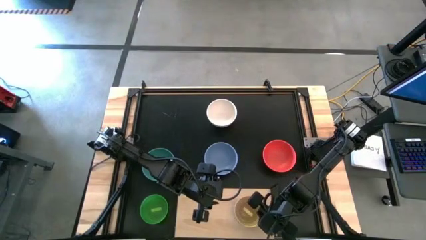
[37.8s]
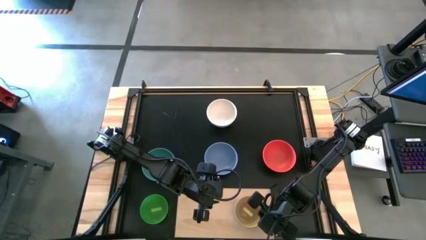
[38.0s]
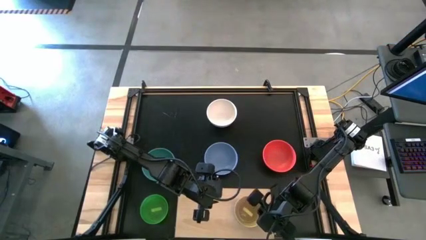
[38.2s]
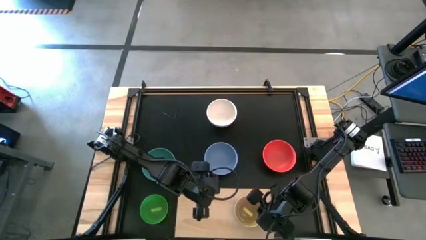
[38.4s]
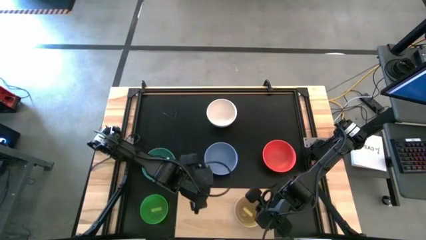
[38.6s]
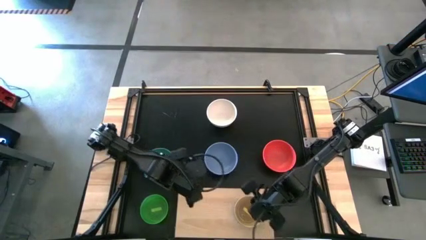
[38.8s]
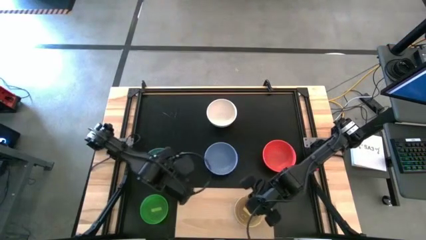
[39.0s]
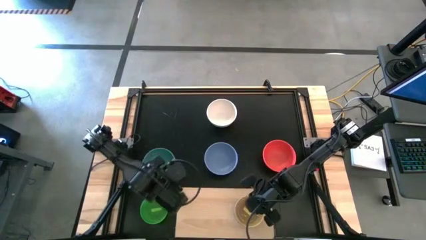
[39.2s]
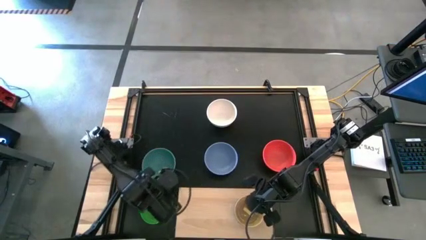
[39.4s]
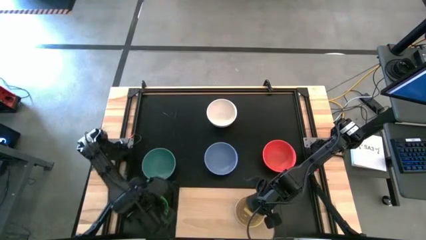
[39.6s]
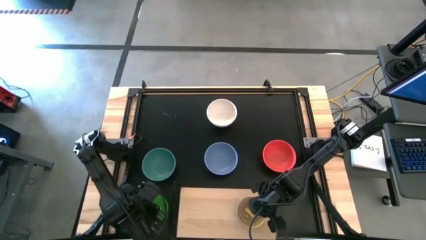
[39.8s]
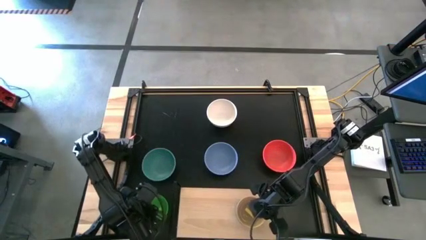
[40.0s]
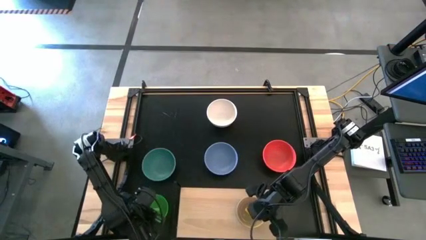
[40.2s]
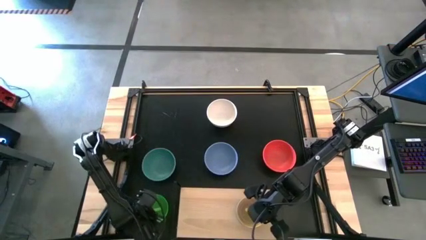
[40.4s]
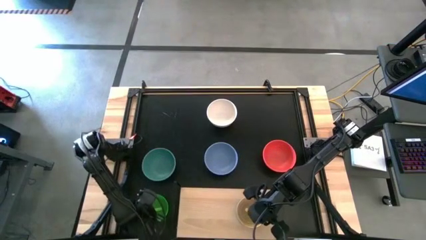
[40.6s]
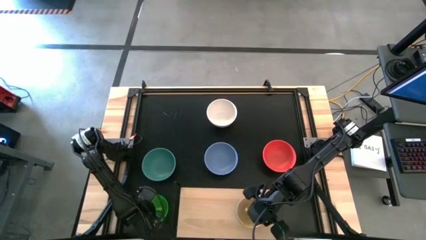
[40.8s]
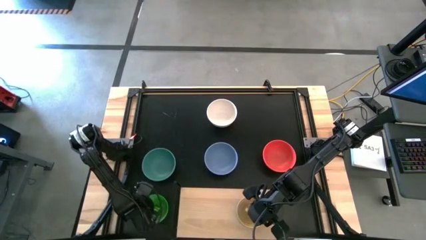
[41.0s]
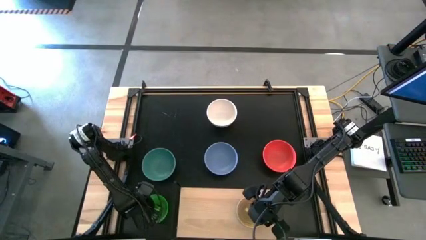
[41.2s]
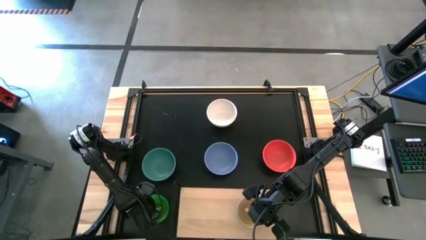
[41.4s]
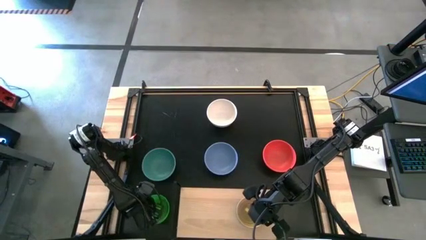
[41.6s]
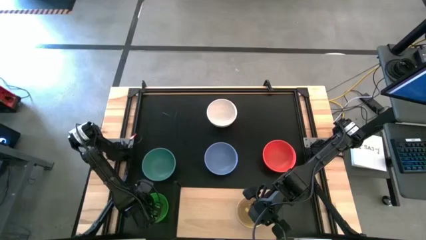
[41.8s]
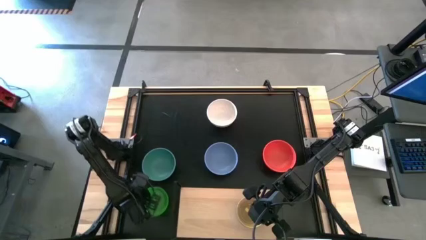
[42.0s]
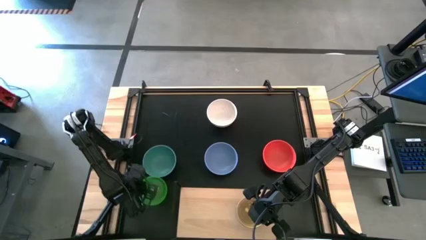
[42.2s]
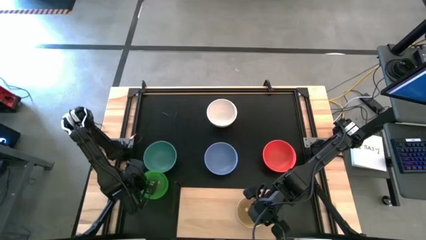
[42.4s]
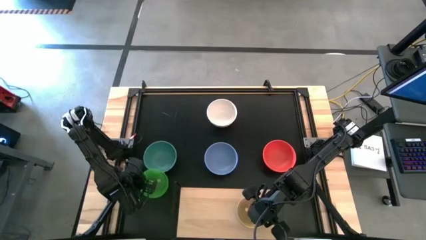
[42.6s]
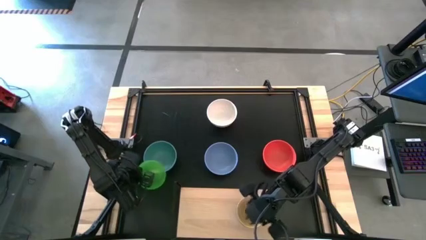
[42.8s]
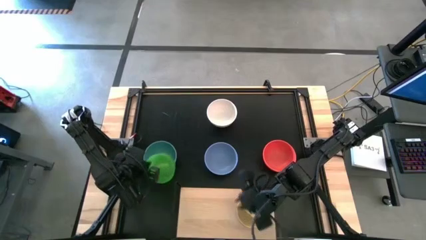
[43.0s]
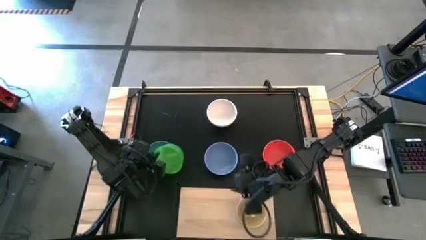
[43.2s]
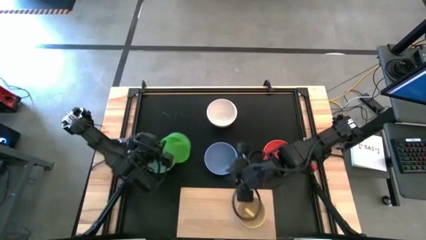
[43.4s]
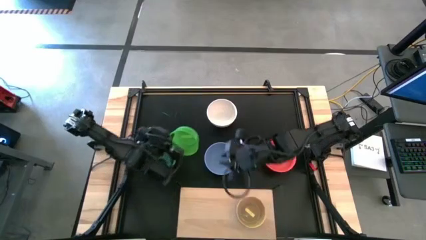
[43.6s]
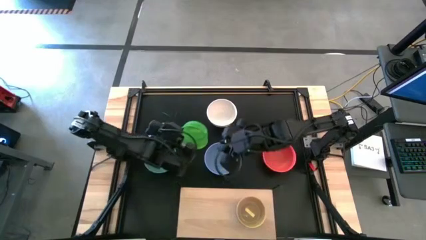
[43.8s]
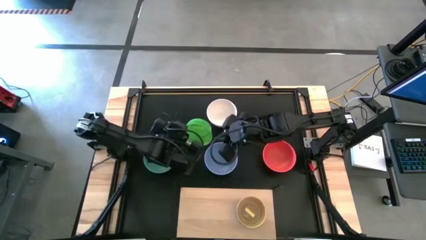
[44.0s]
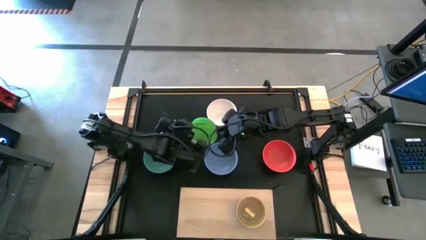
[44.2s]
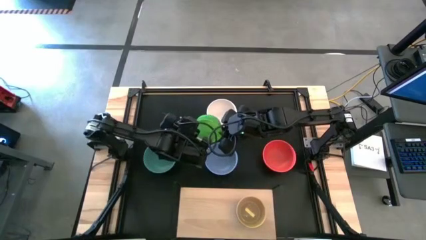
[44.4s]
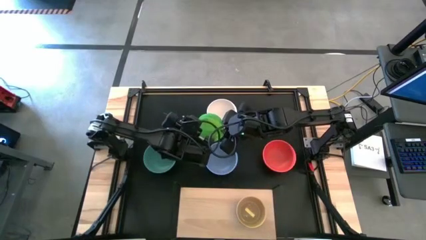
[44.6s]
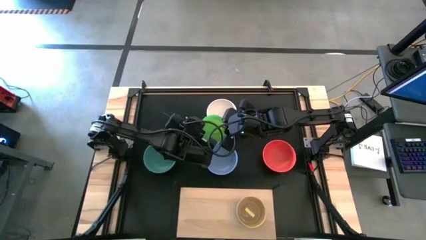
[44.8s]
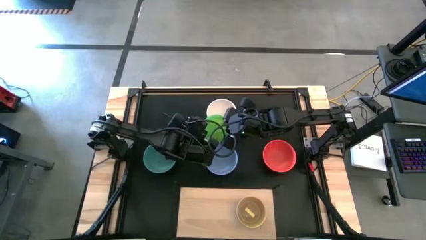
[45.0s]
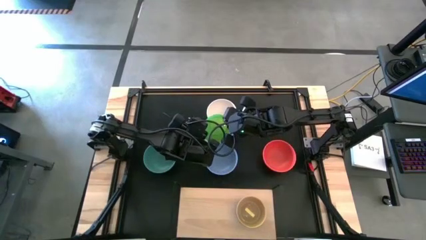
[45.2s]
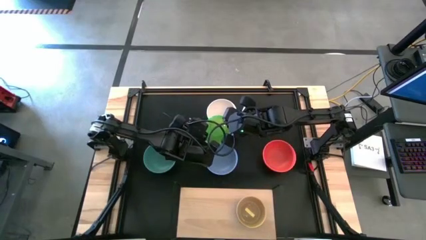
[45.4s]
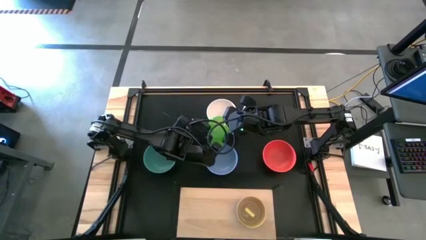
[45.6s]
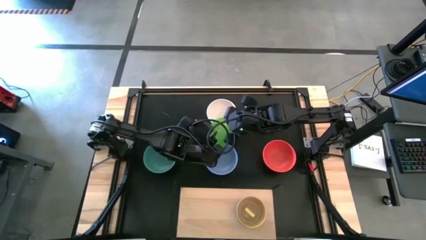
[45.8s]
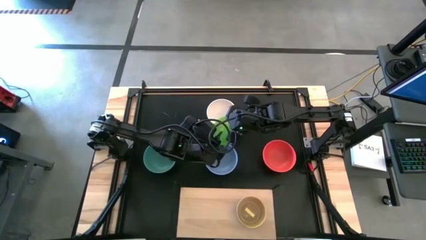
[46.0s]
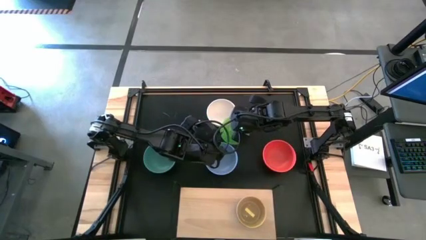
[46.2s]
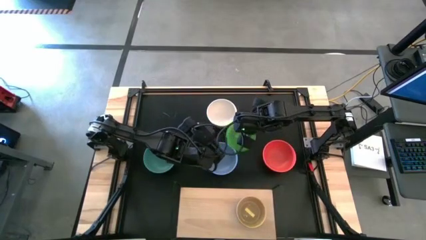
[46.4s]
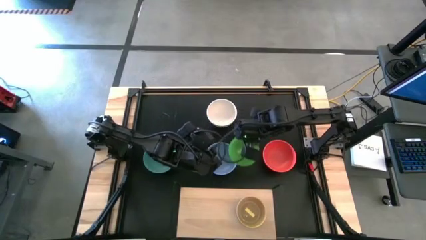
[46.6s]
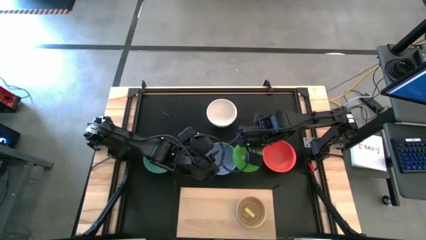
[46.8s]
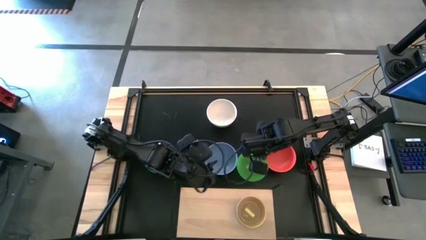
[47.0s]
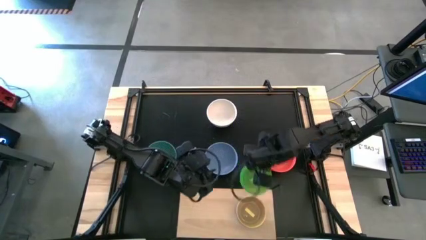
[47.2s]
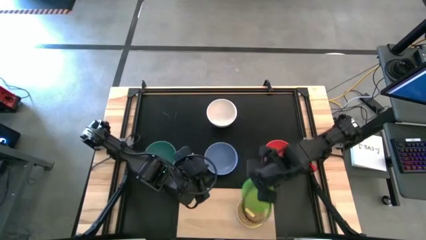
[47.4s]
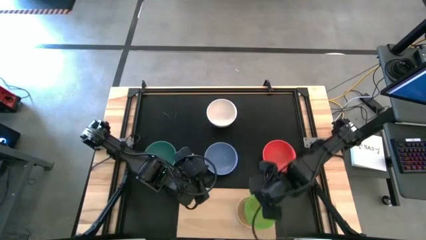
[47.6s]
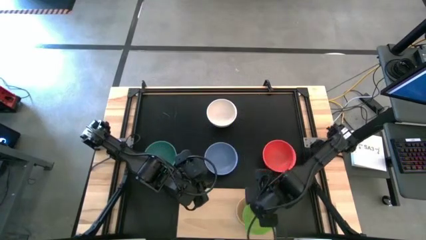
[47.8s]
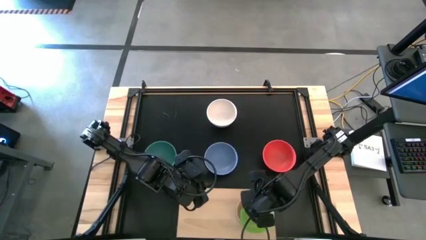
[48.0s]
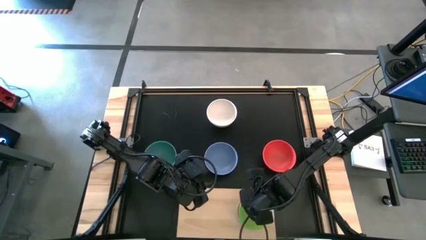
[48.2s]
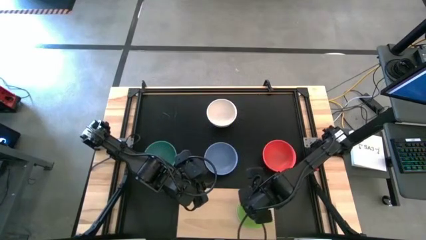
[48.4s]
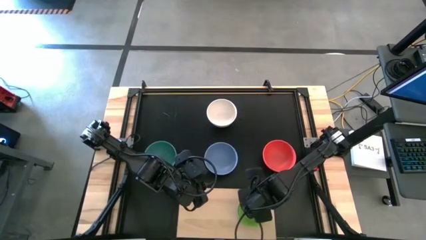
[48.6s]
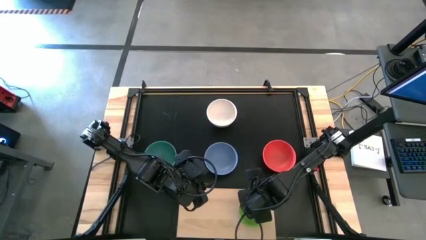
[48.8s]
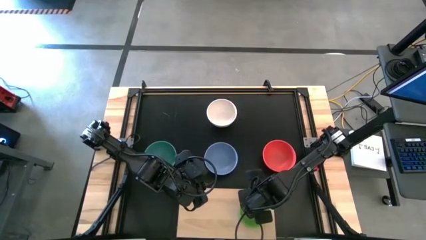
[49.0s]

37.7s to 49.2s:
Task: Place and stack bowls onto a shelf
Stack the small green bowl on top of the small yellow bowl on the shelf

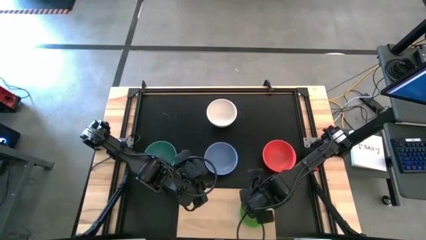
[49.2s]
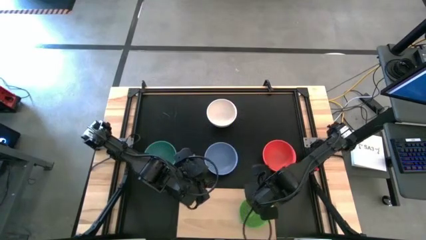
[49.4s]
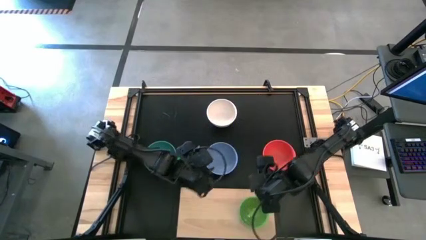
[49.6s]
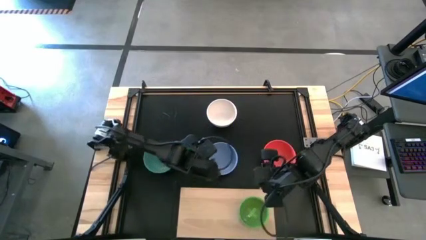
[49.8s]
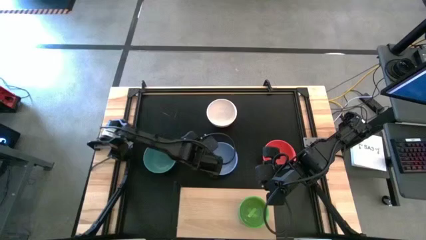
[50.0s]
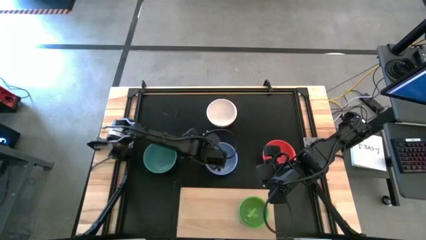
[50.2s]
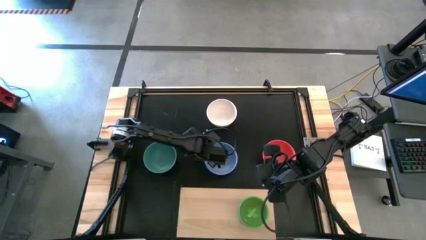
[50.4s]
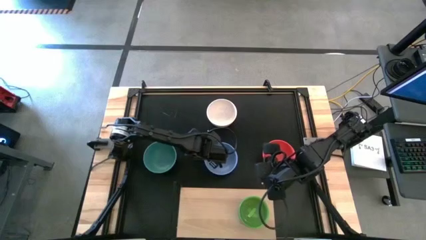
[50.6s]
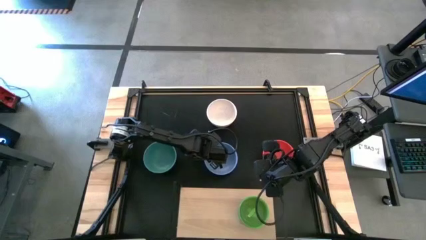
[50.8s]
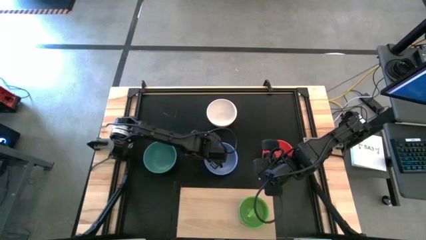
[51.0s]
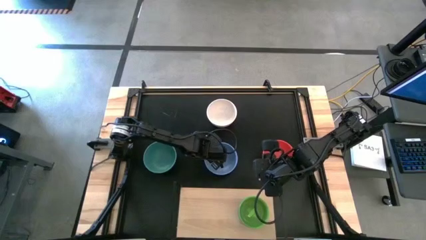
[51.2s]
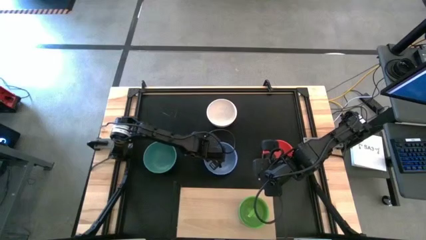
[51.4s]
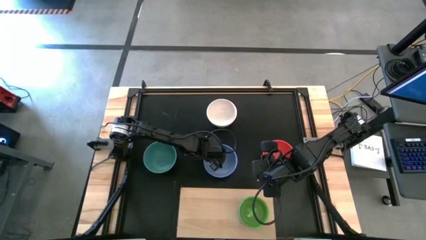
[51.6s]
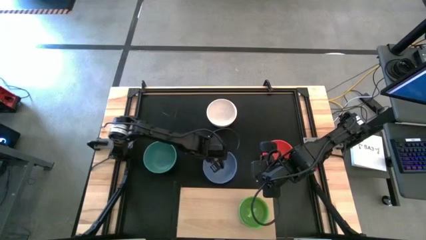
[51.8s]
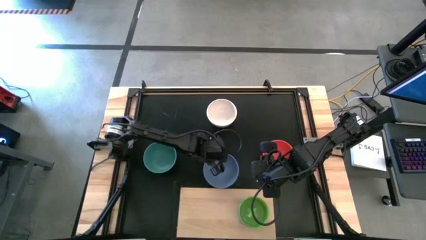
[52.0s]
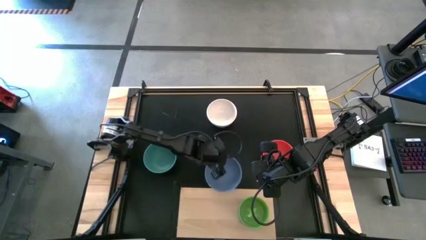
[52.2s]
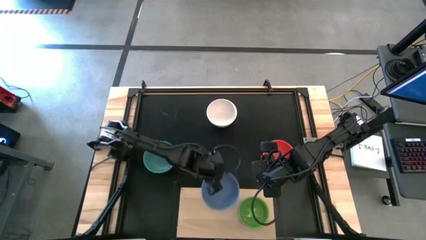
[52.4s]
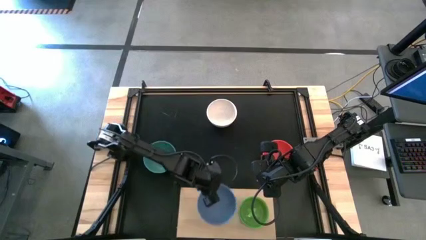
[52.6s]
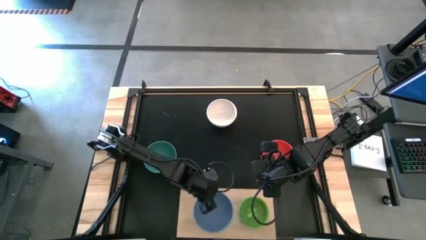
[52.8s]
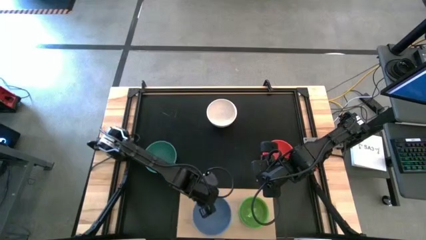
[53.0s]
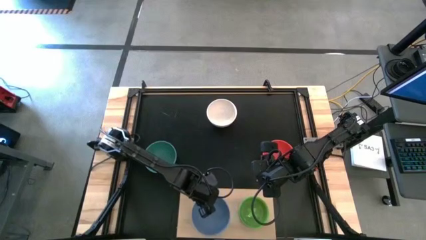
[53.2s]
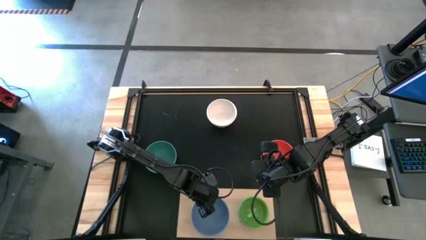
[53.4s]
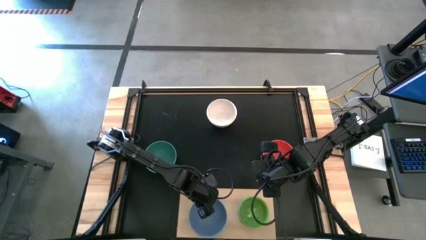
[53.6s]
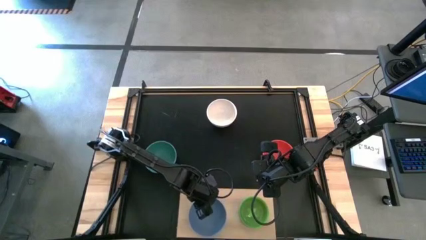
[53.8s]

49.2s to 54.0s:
Put the big blue bowl on the shelf
